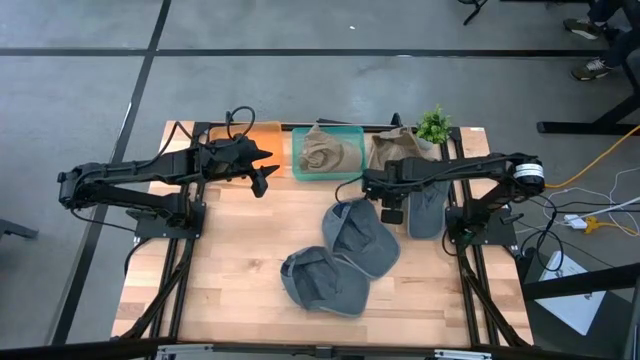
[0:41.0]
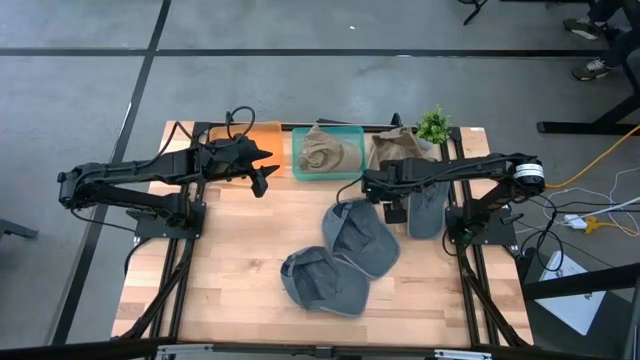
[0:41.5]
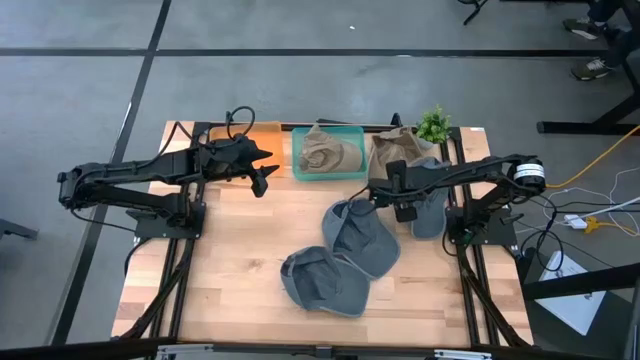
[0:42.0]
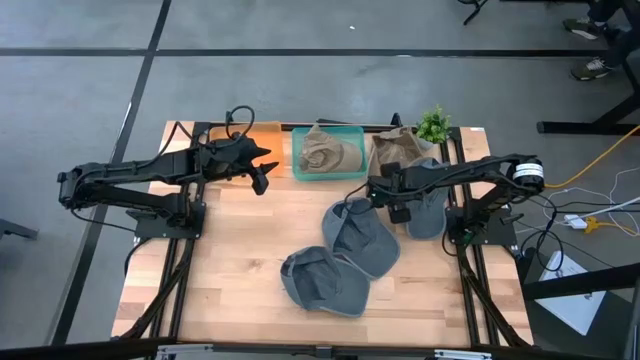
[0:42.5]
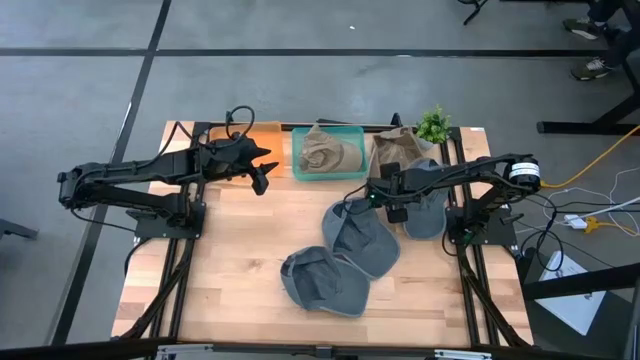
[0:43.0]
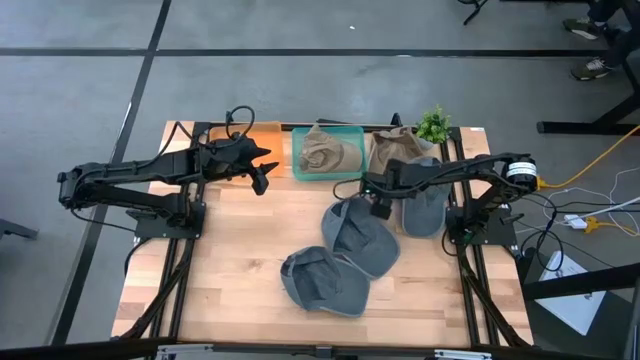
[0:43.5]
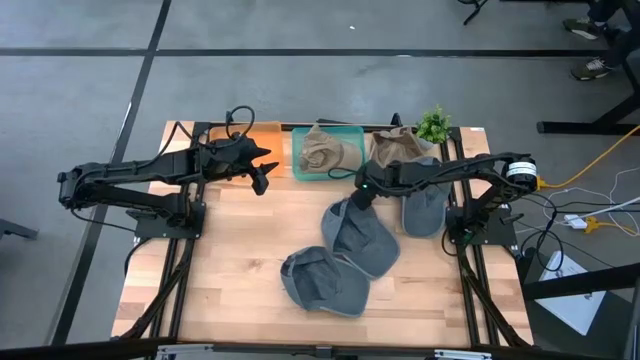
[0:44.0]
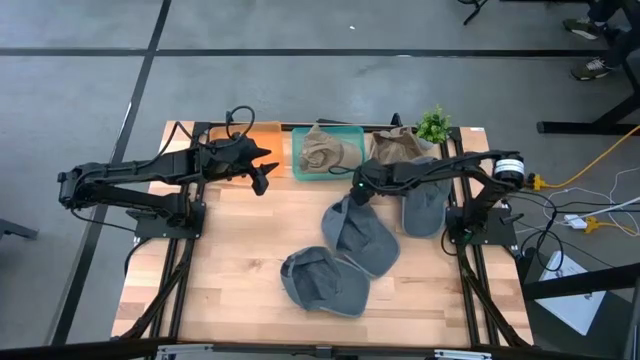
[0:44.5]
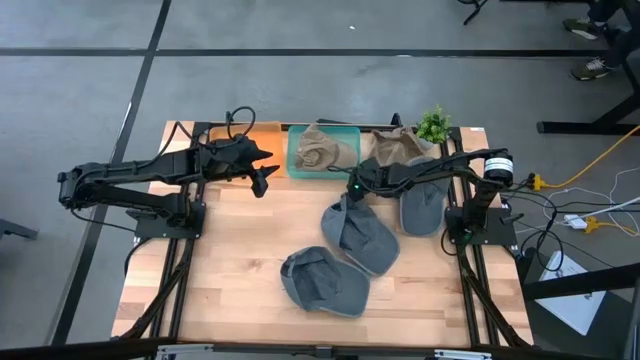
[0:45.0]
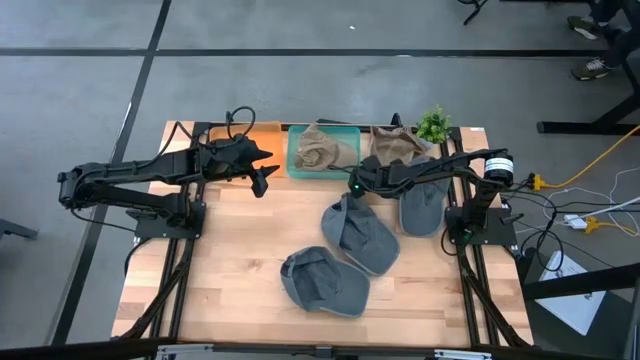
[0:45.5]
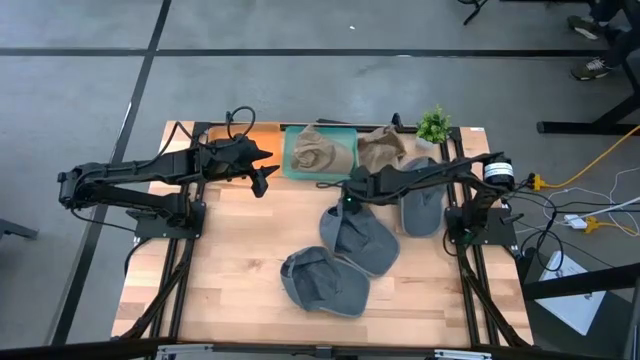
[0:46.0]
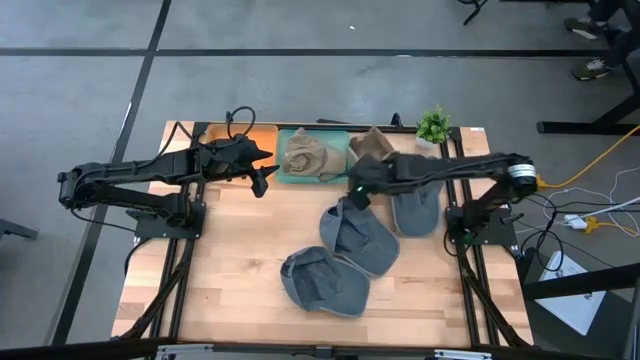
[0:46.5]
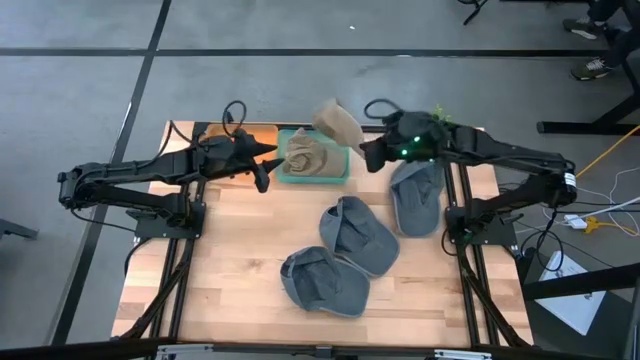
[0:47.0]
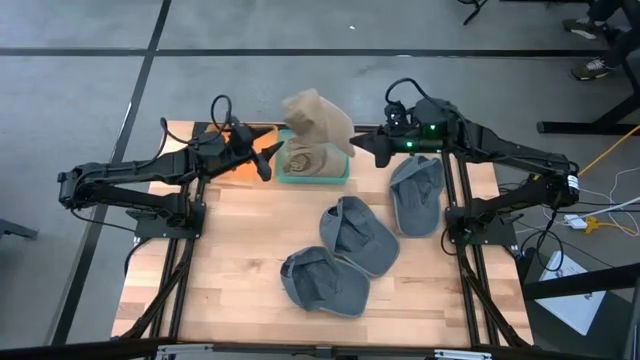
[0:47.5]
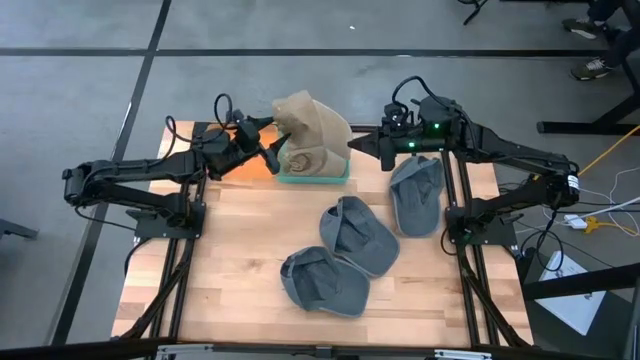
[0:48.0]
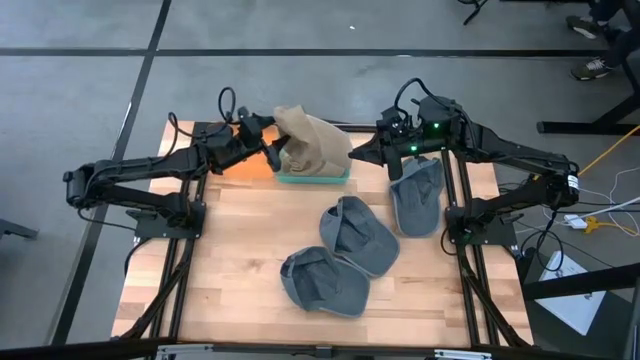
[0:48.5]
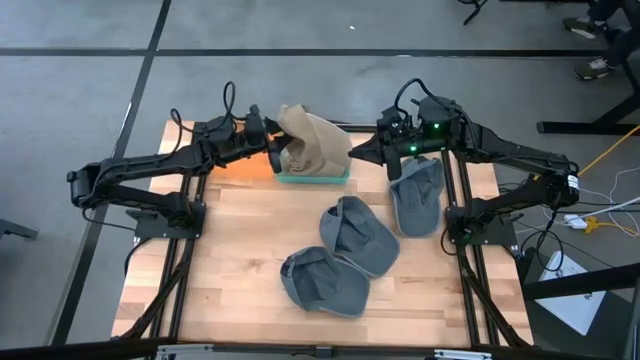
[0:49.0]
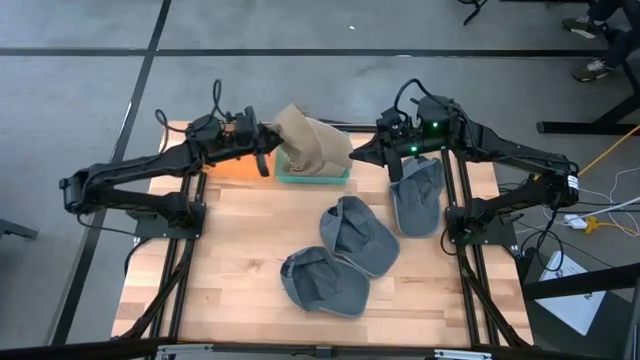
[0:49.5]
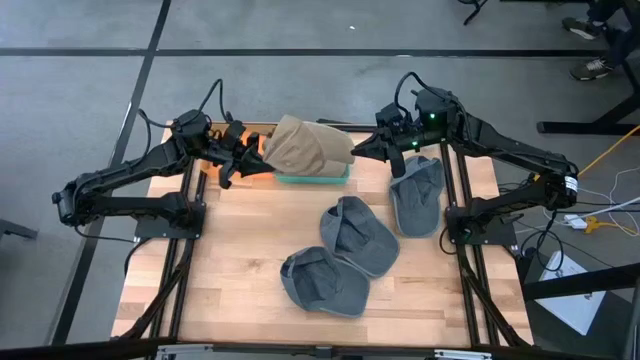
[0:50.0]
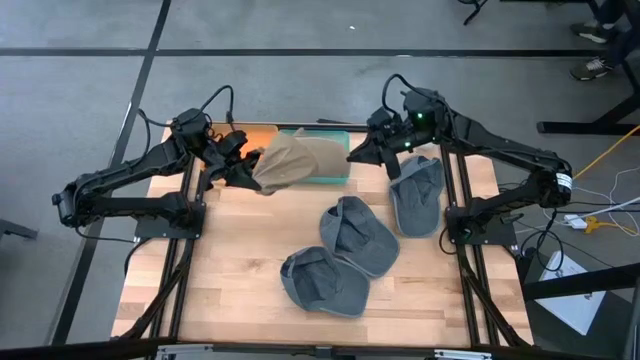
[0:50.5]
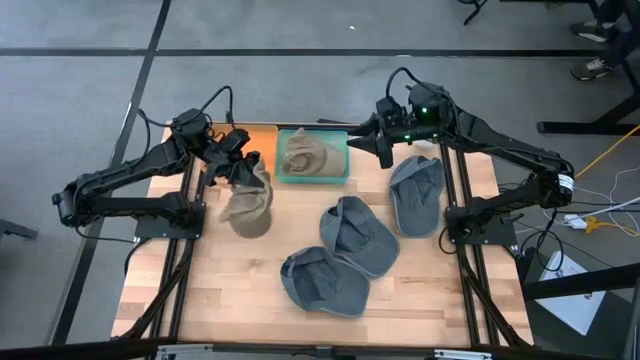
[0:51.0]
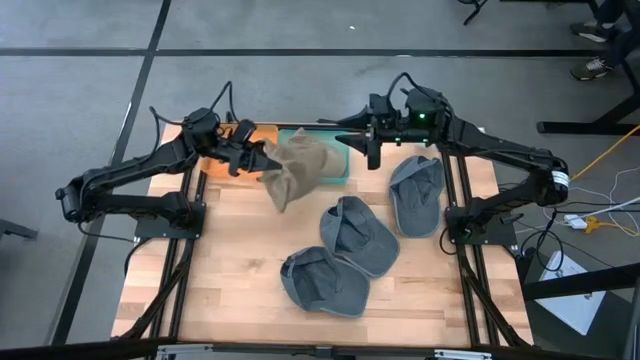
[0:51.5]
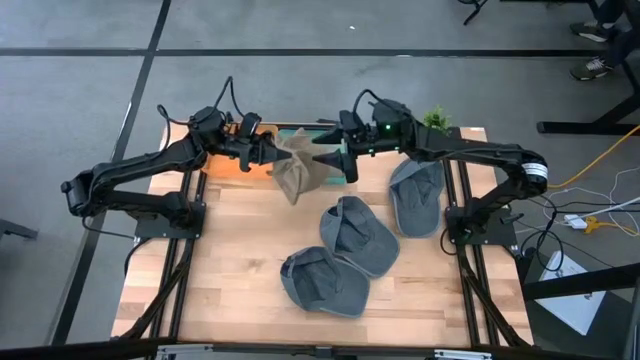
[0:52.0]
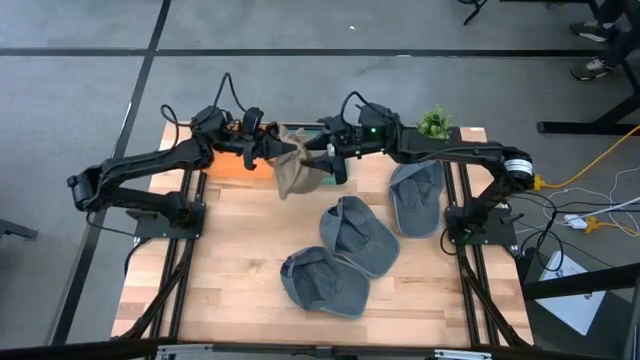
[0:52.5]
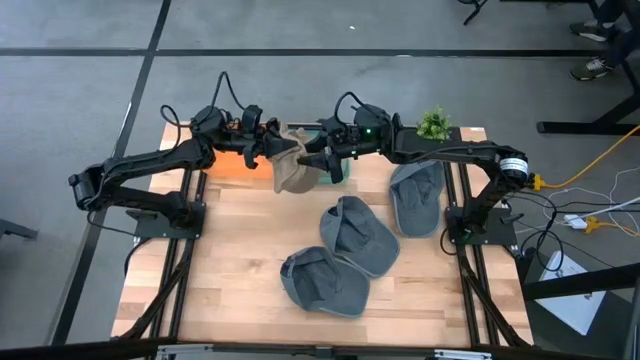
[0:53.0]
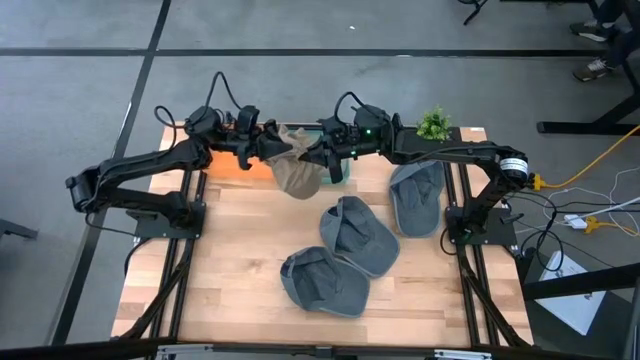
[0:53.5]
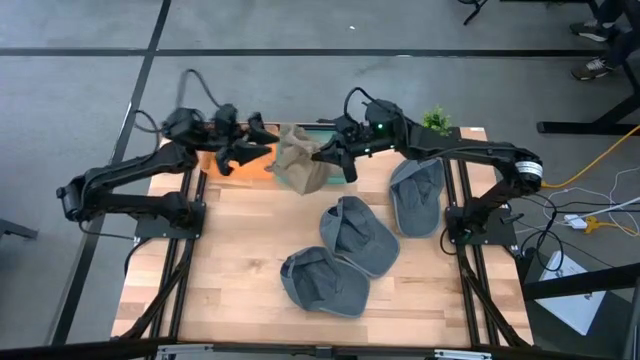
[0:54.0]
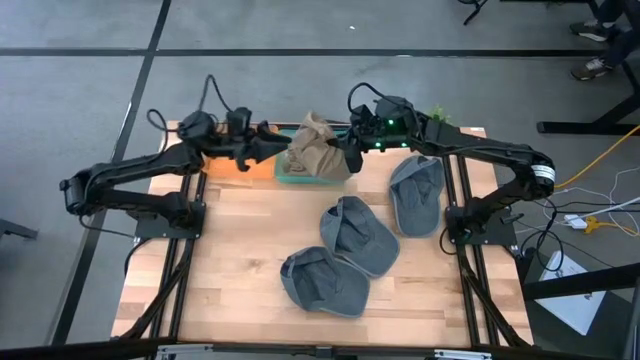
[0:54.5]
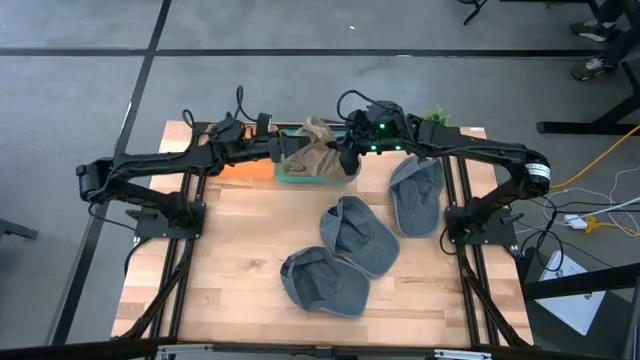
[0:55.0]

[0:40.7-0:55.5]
Task: Pick & Place hat
Put the brown cap into the green bin

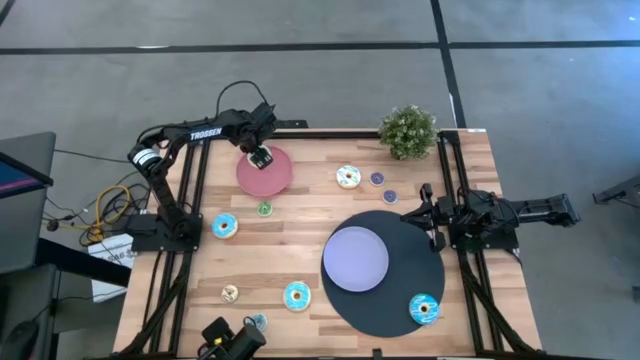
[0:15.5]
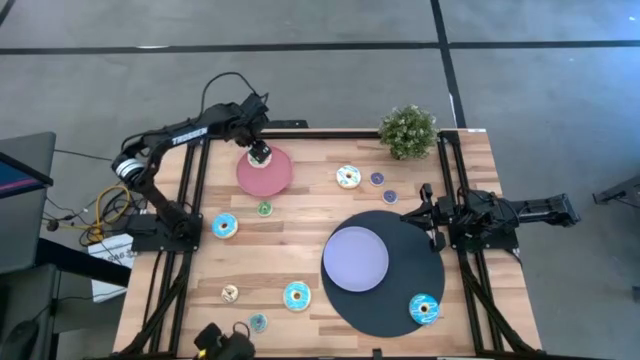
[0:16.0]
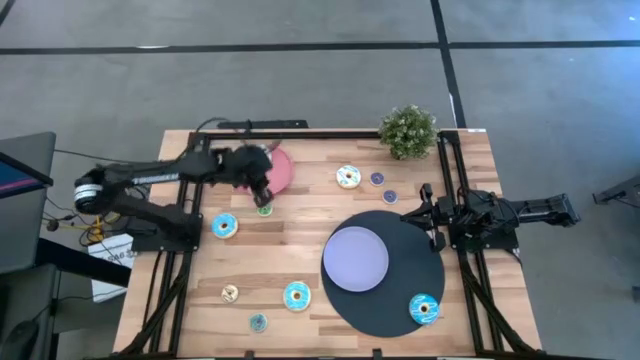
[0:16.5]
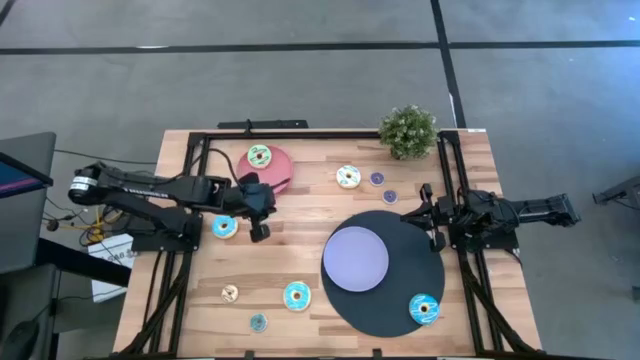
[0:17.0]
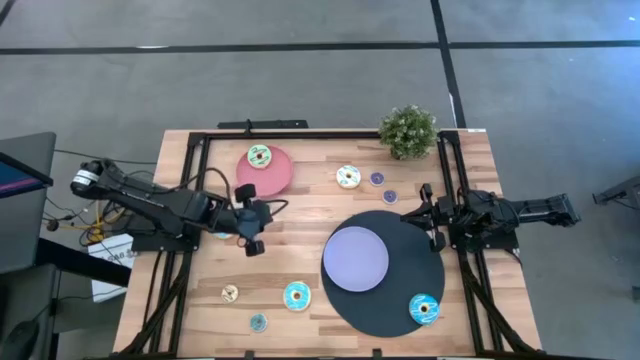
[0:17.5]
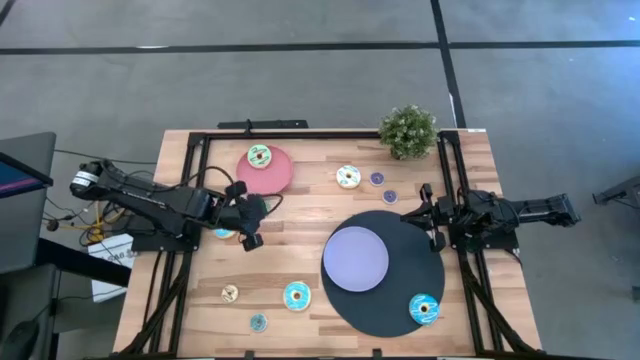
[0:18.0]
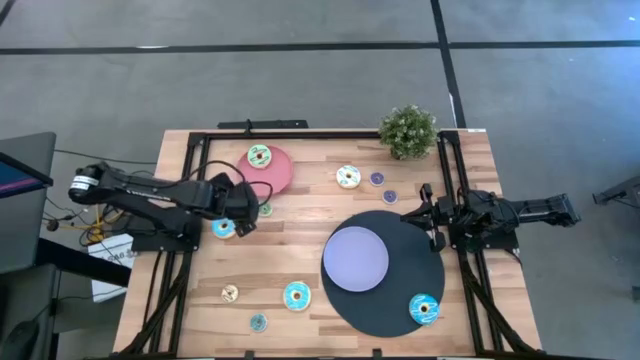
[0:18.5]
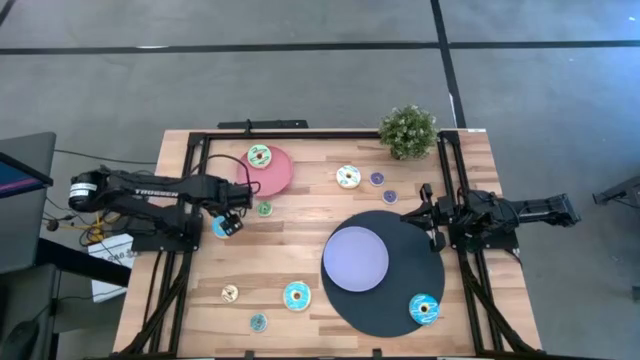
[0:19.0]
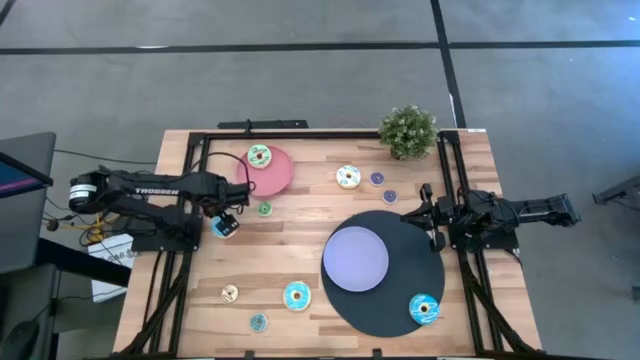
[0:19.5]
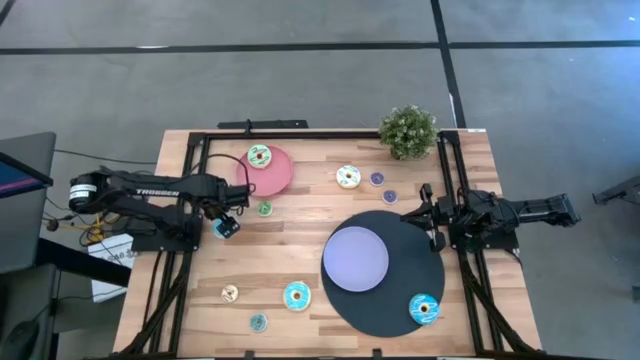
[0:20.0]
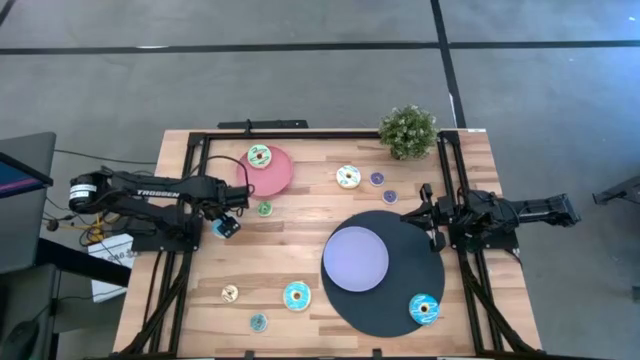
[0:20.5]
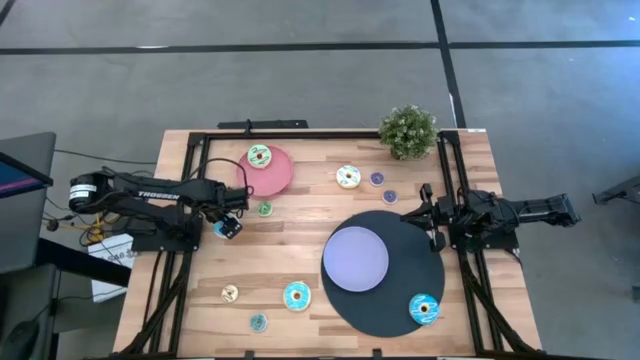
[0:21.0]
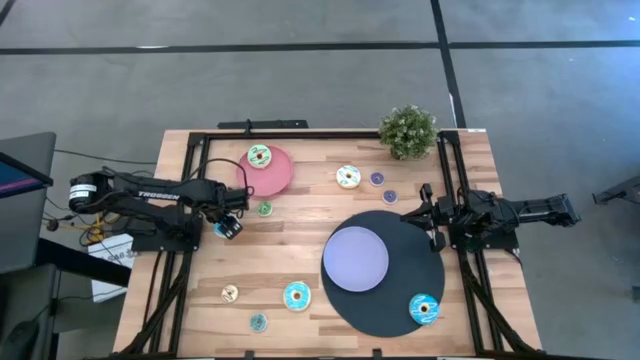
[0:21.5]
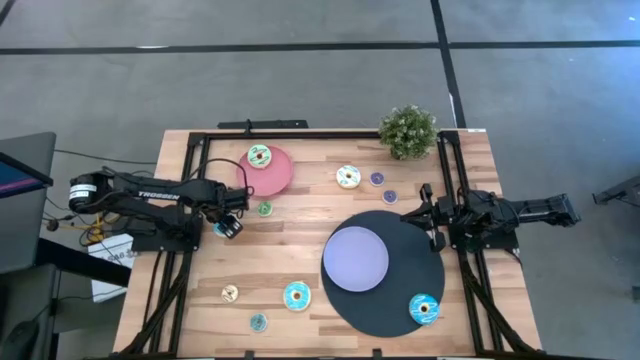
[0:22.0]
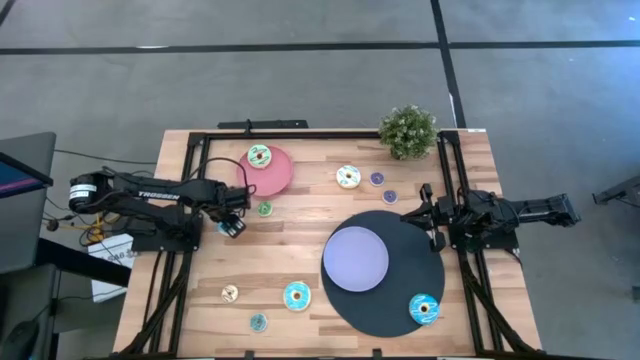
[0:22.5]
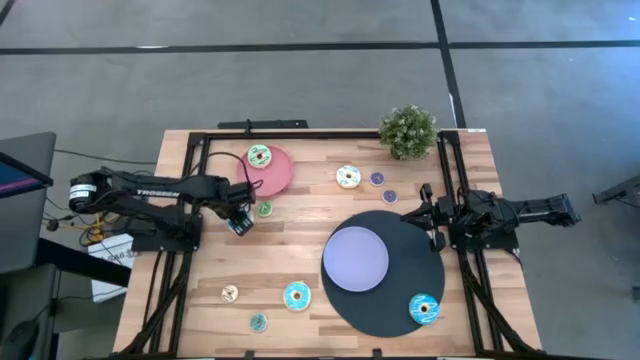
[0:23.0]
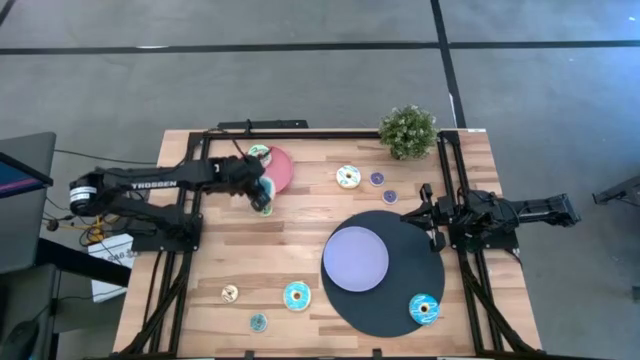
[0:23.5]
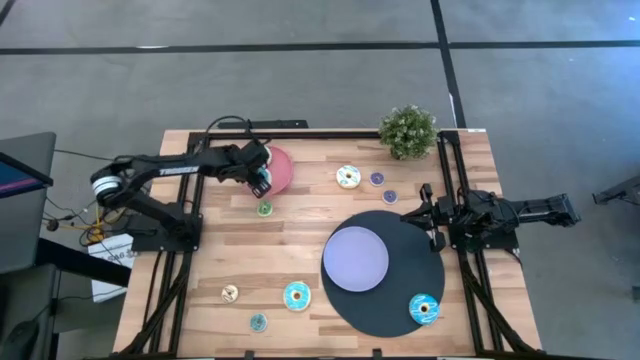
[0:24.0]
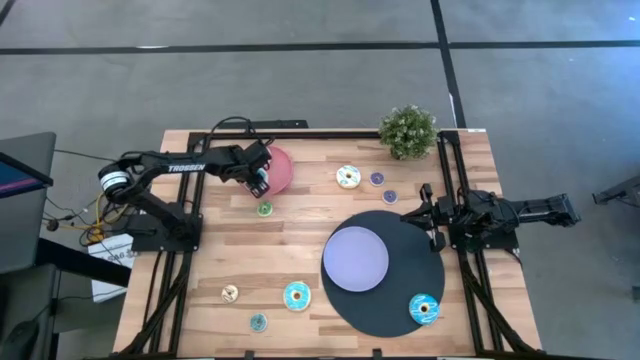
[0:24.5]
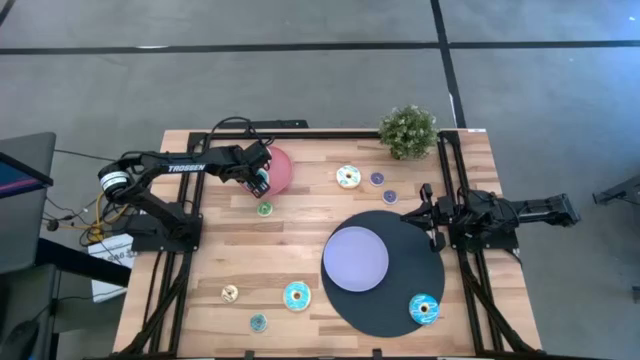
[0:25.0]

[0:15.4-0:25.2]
Task: Pick & Place donuts
Put the big blue donut on the pink plate
